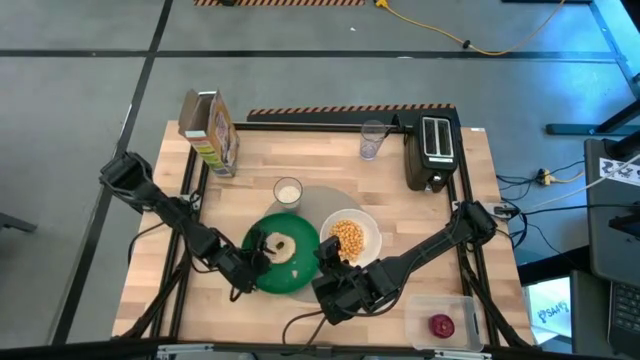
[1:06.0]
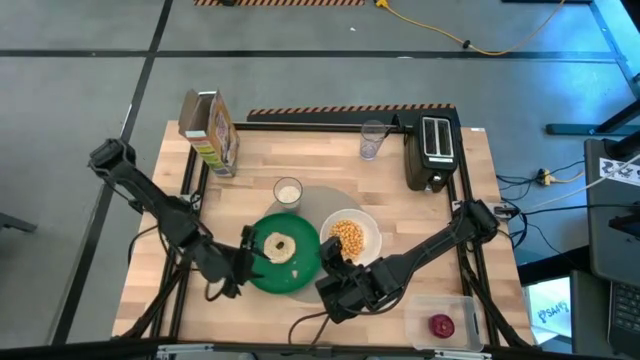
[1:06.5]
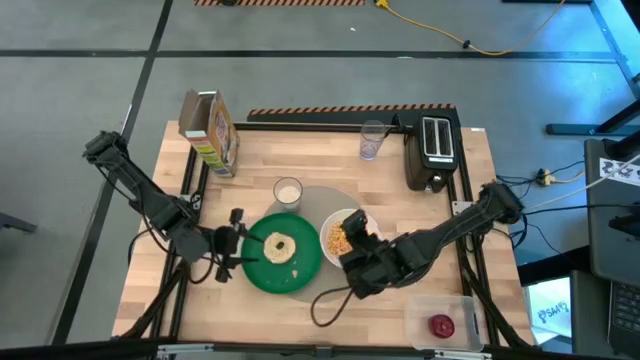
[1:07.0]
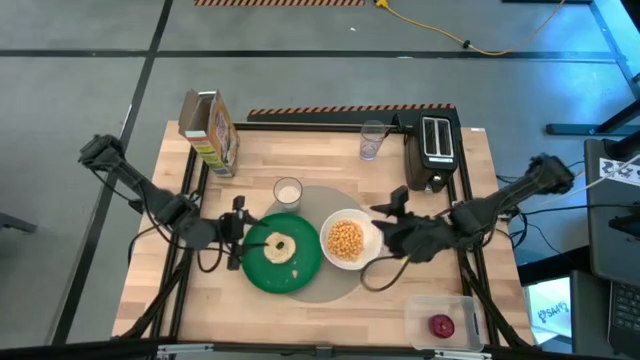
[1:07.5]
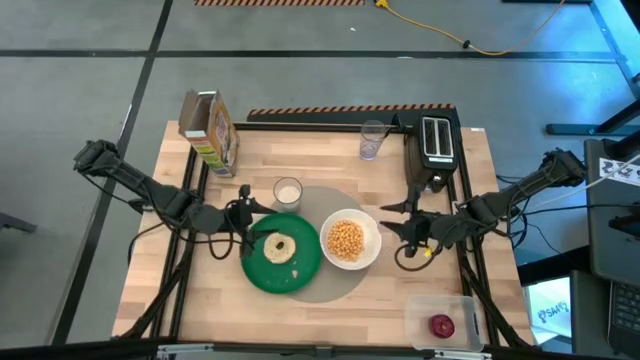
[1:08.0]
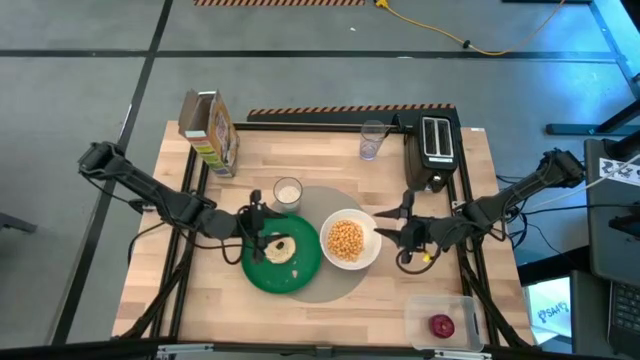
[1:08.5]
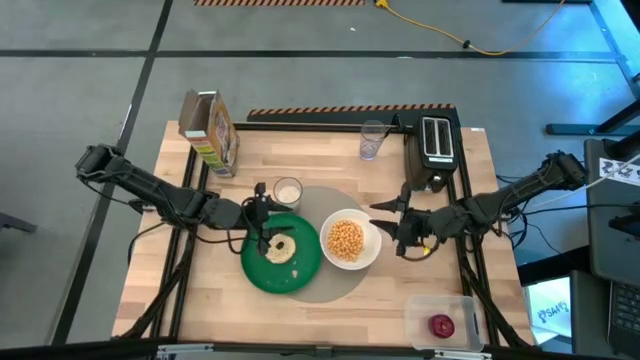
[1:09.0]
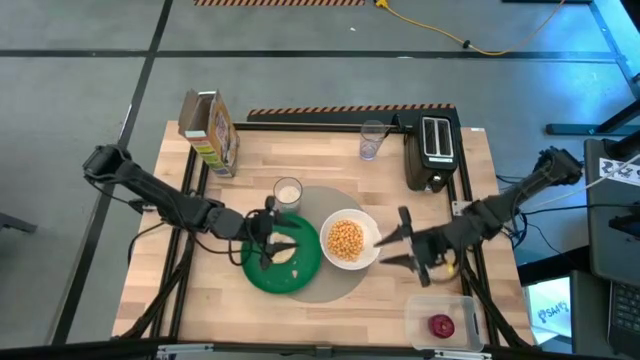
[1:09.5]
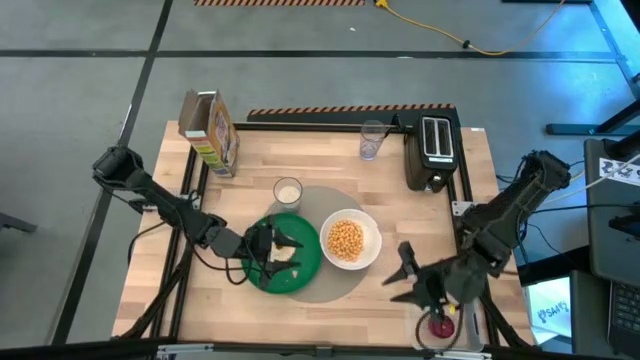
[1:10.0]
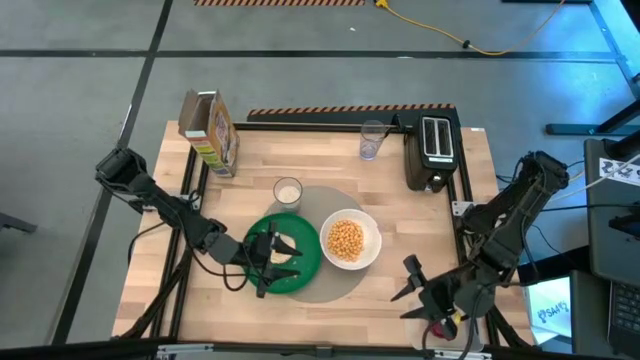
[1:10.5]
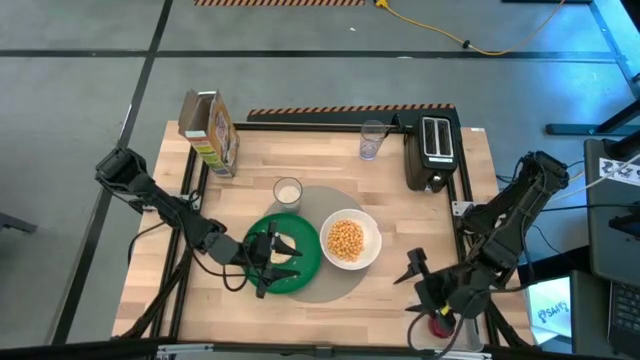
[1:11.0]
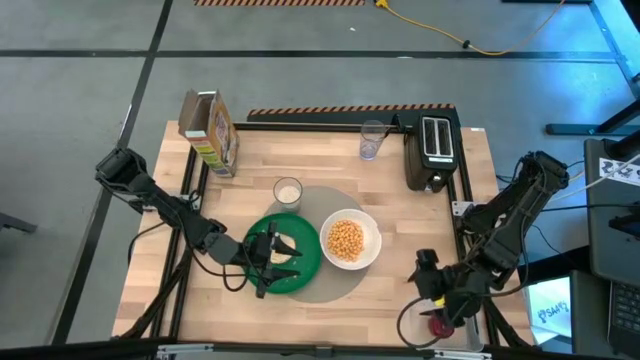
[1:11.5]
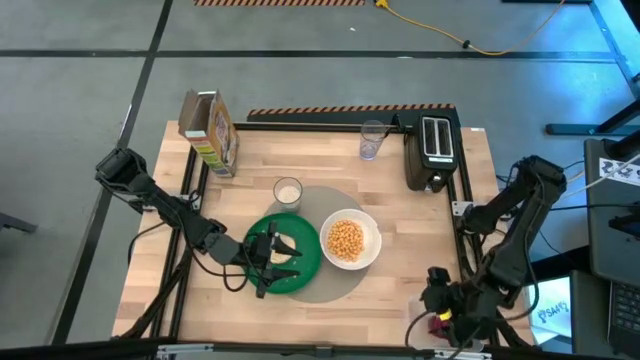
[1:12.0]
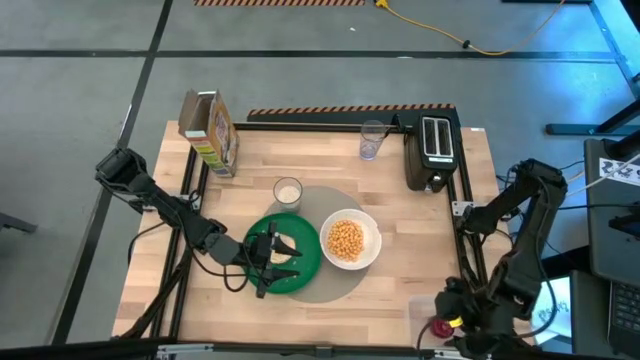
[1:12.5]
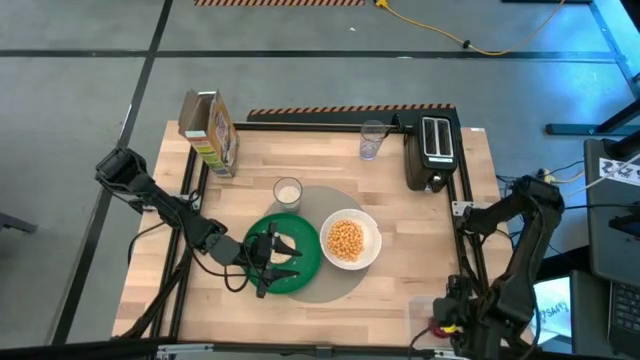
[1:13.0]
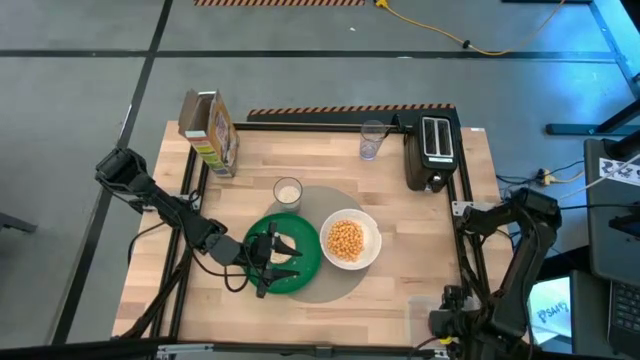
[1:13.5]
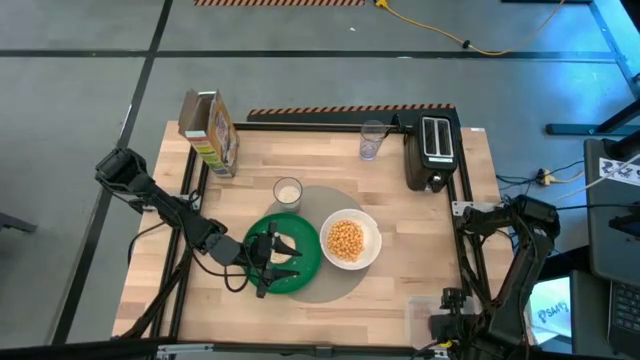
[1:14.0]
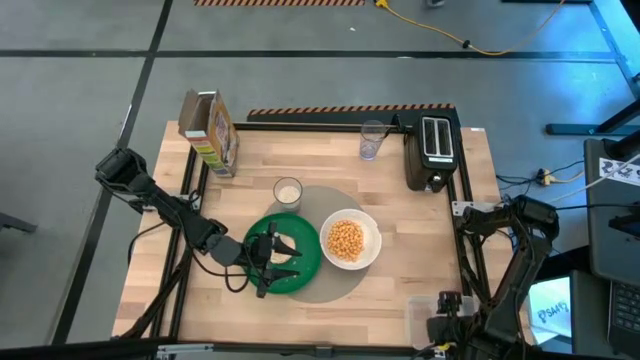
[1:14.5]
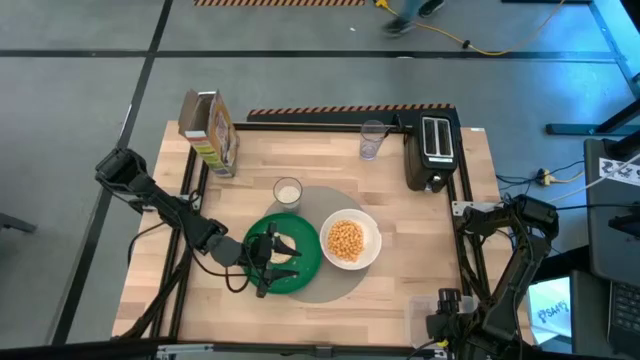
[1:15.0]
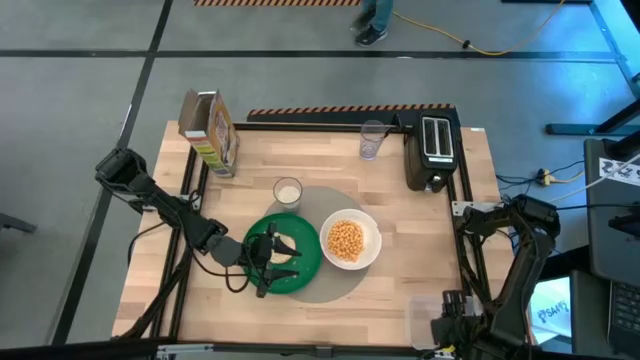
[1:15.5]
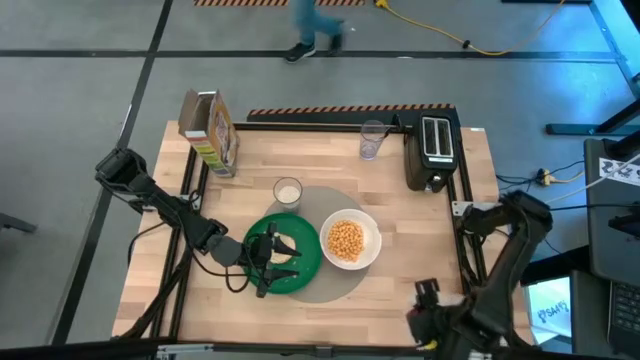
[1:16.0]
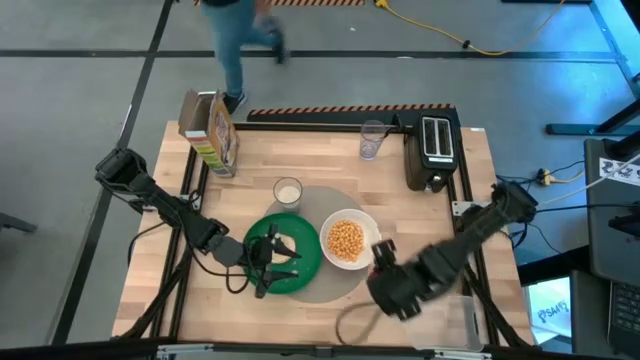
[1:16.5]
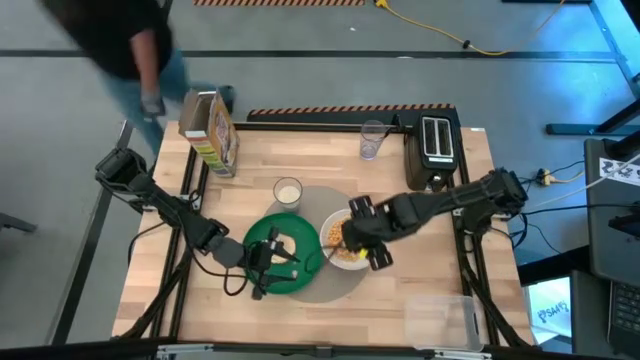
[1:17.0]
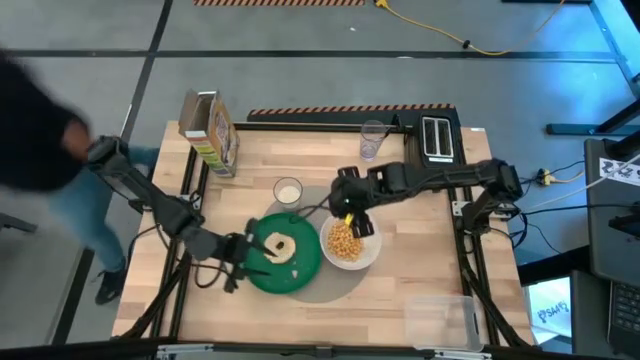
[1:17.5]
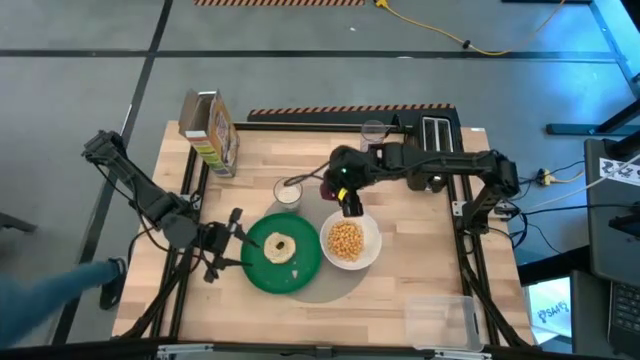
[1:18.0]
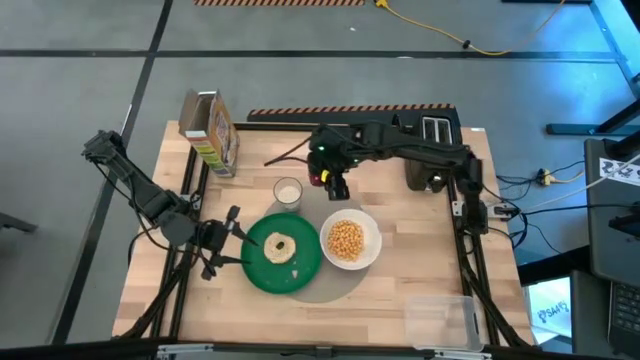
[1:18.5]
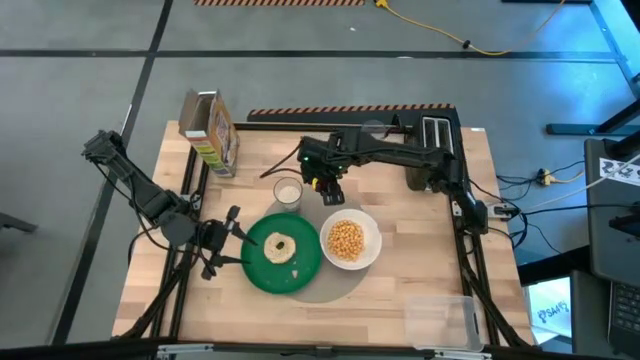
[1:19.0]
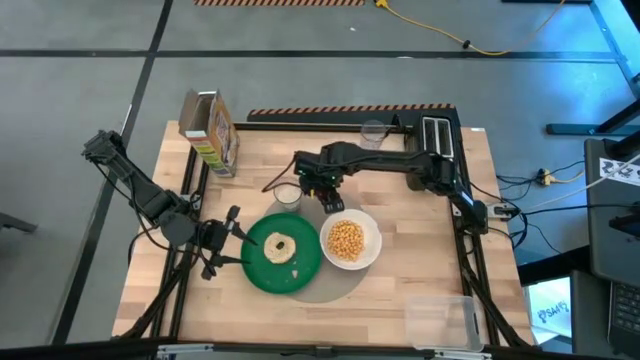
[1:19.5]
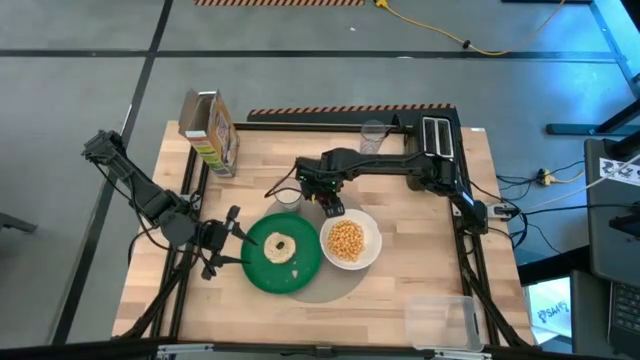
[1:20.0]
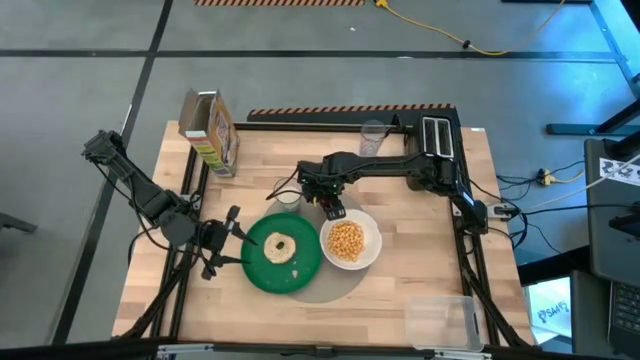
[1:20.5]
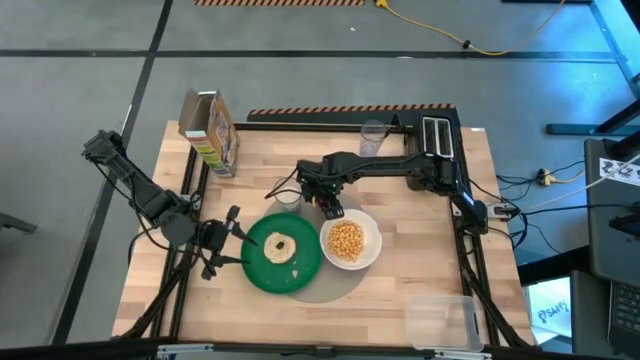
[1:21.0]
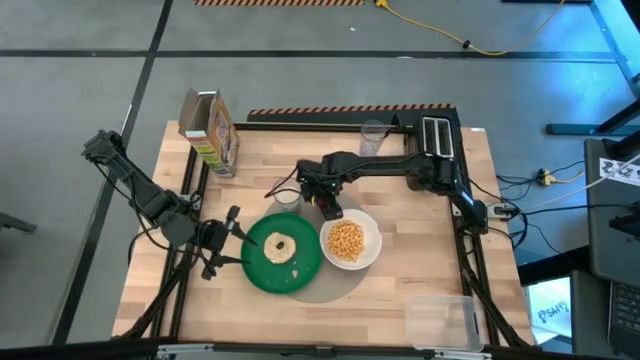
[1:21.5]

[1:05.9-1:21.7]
Task: Arrange a breakfast setting
Put the red apple on the grey tablemat to the top left of the white bowl

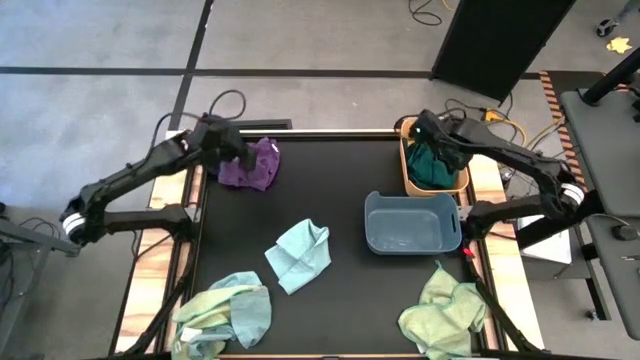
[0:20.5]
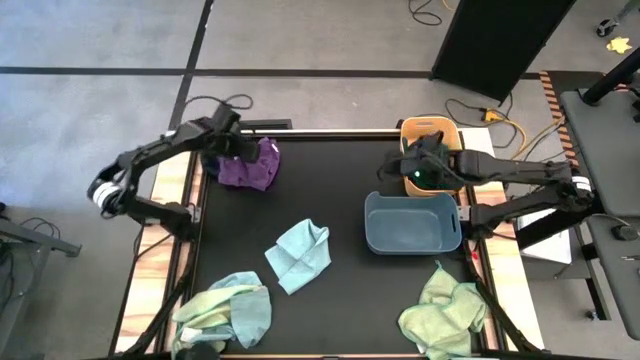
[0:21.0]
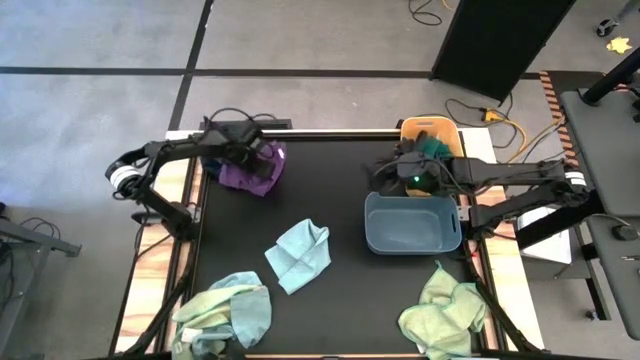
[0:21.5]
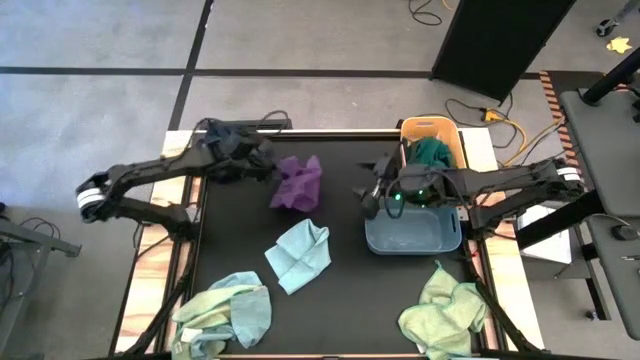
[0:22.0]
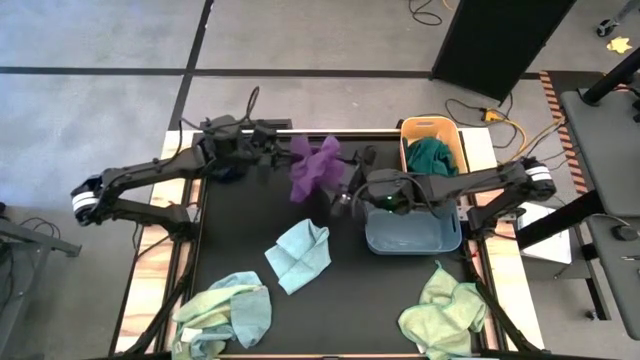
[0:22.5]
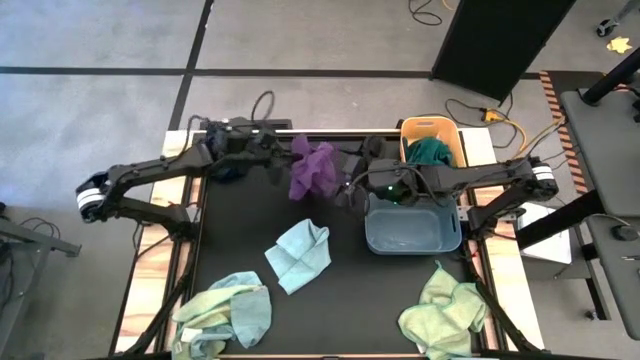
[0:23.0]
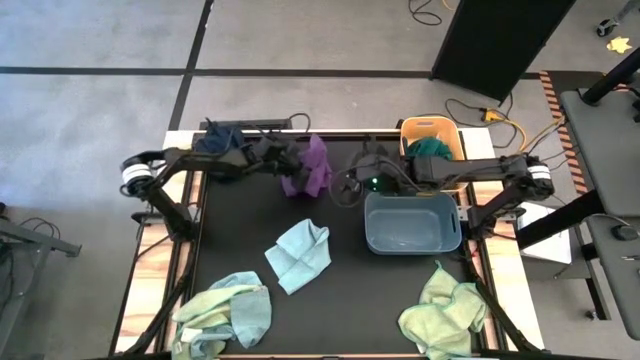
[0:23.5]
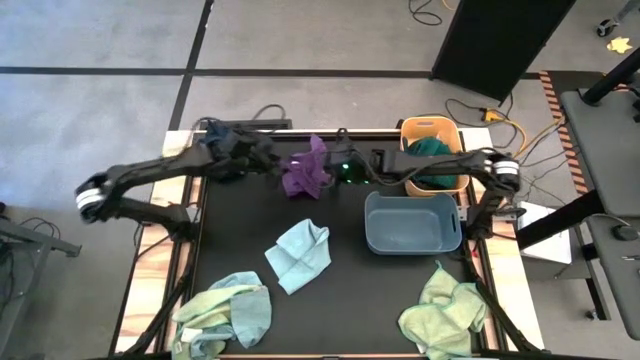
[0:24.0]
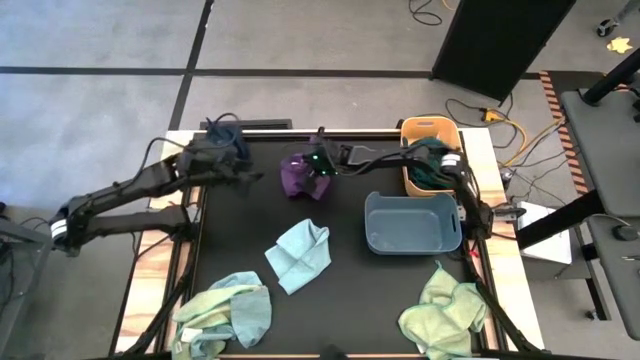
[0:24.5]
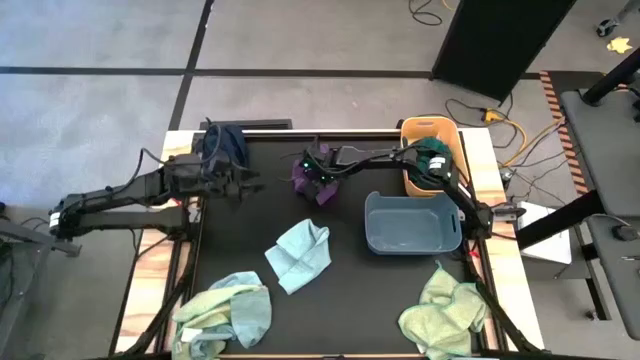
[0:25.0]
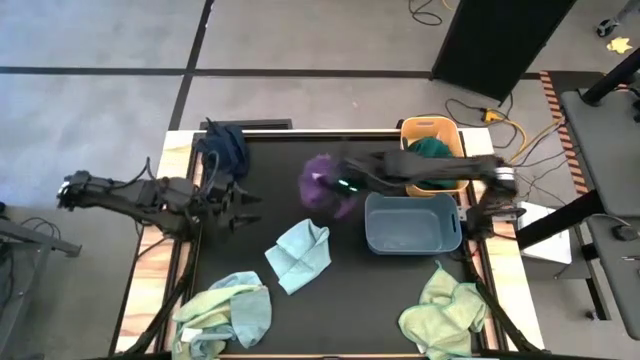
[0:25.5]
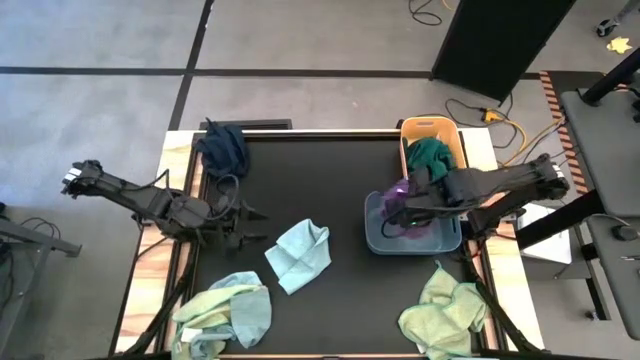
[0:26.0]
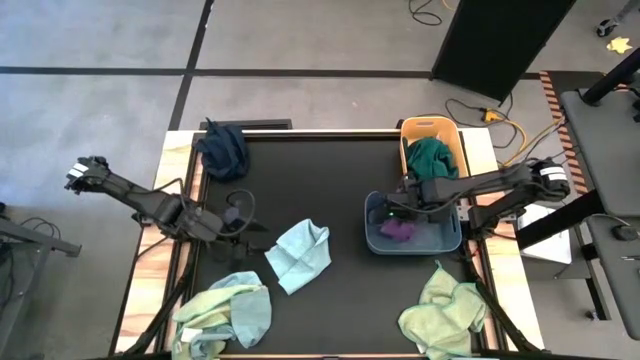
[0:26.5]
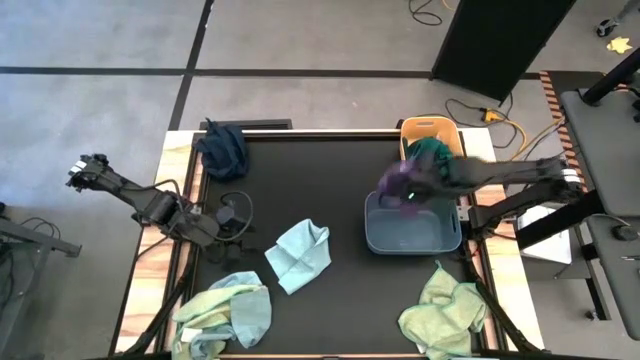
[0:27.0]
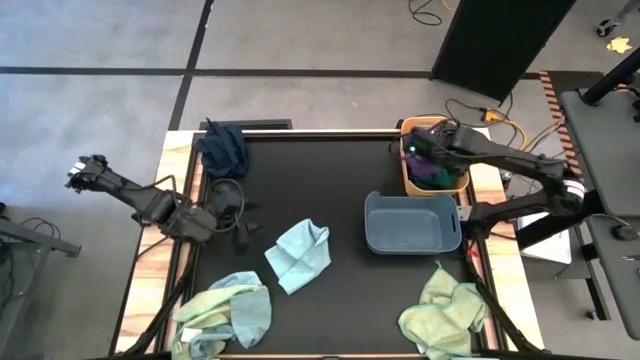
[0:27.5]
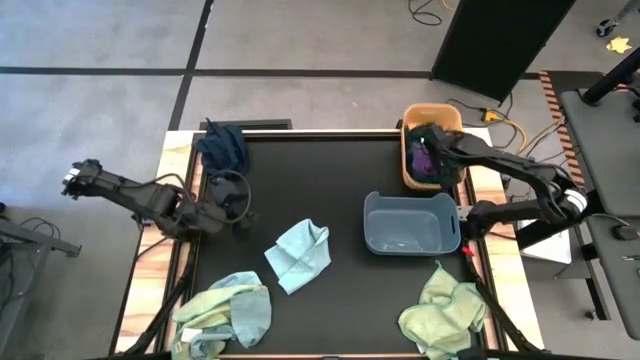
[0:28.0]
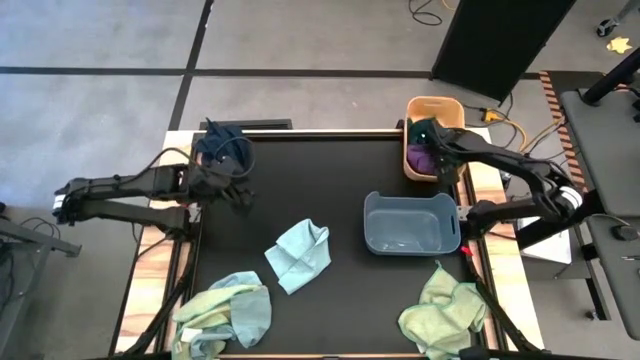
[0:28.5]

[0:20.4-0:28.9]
Task: Sort towels by color in basket
Put the purple towel into the yellow bin
